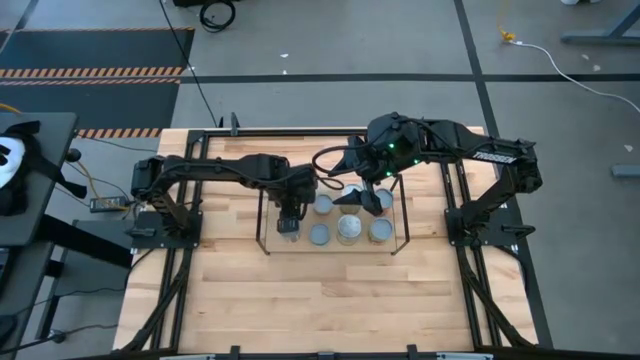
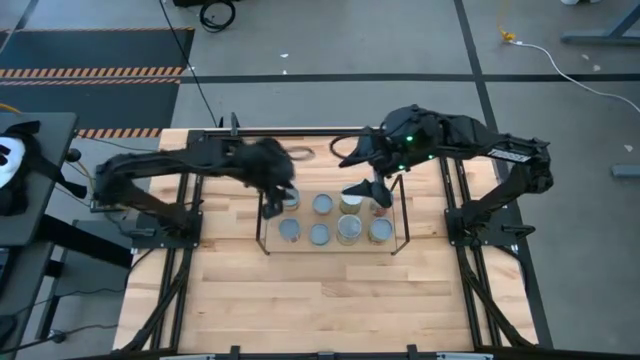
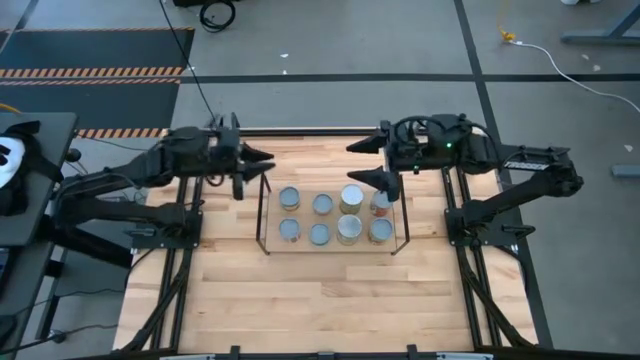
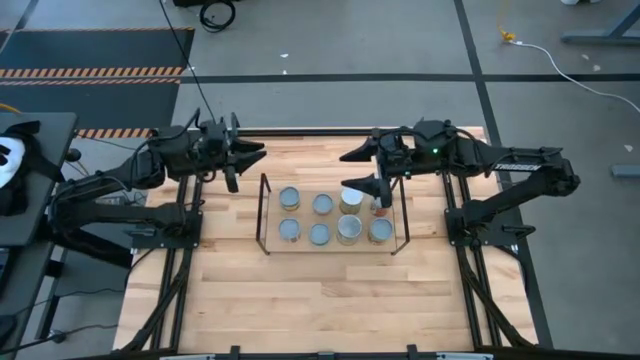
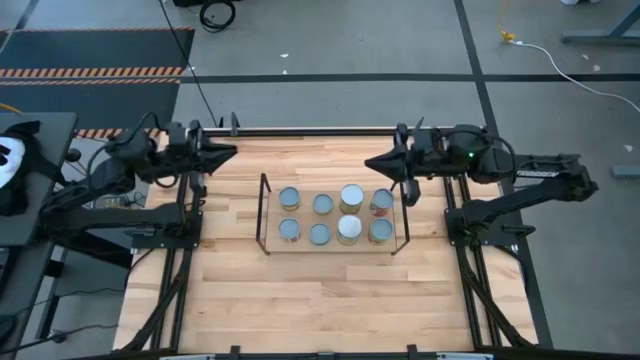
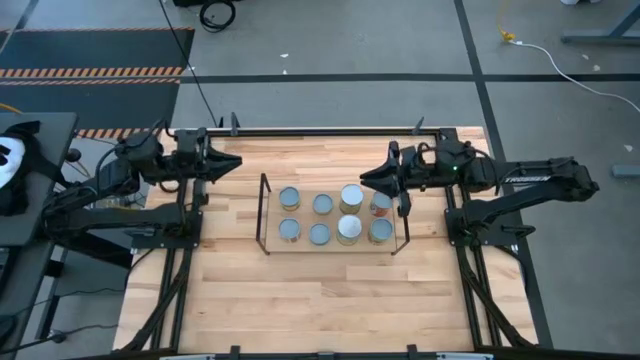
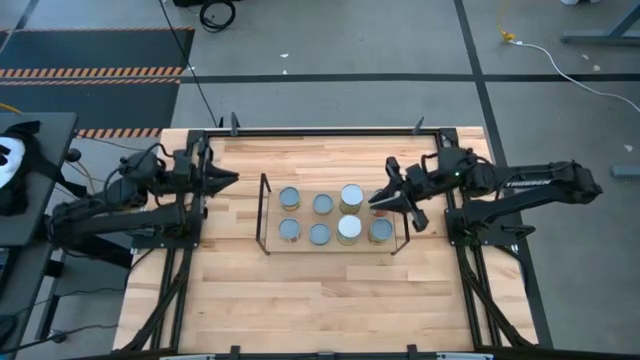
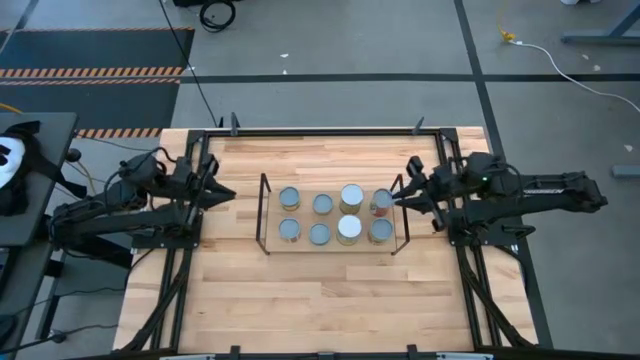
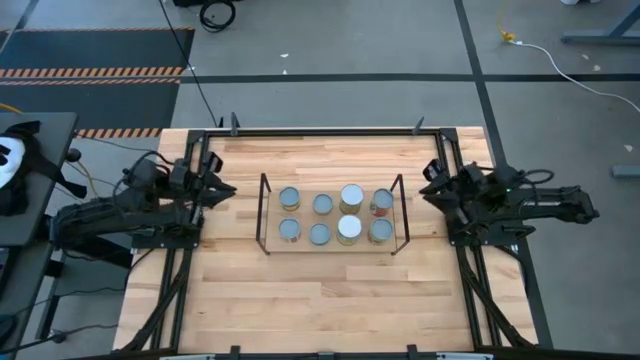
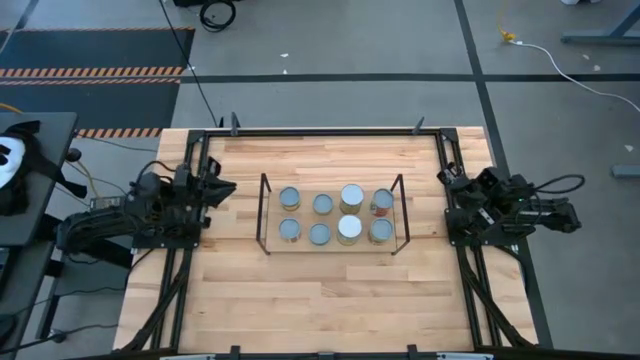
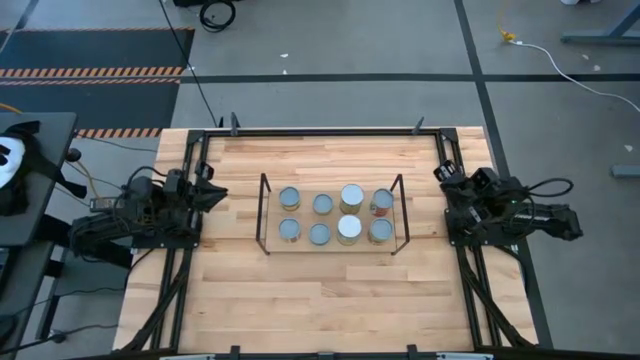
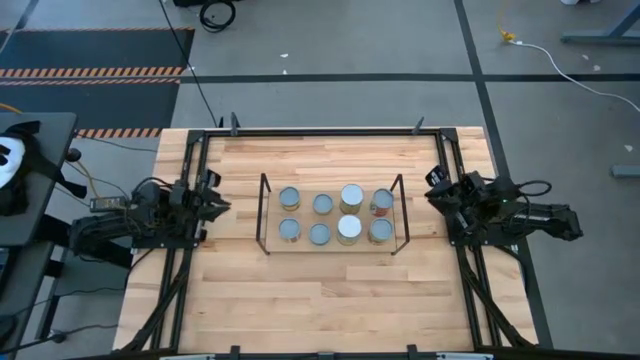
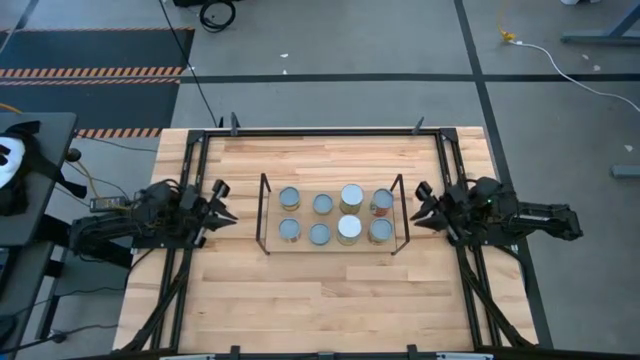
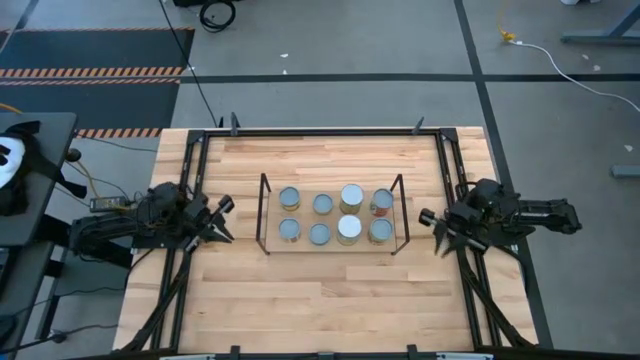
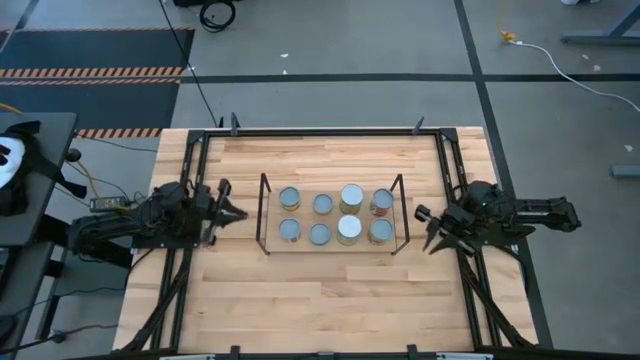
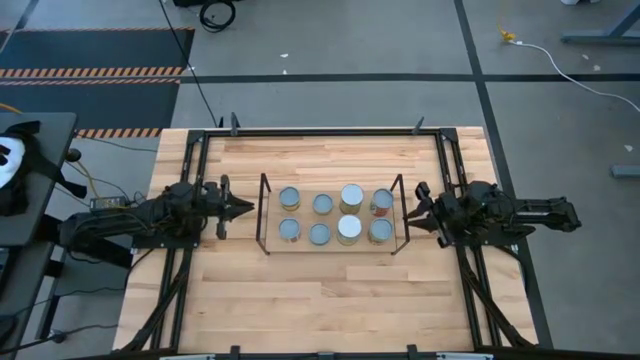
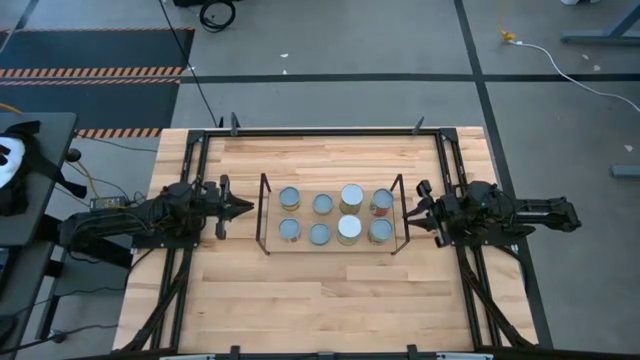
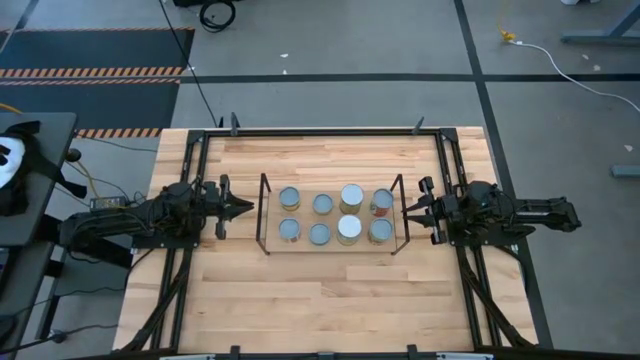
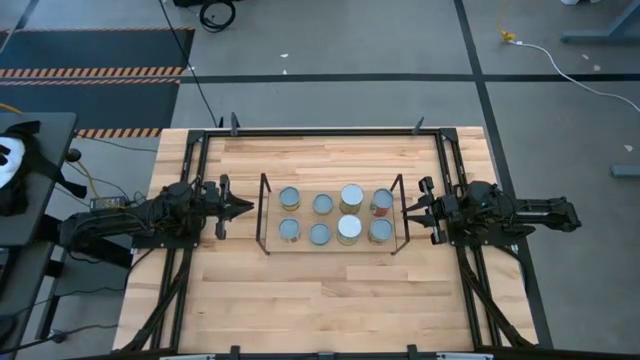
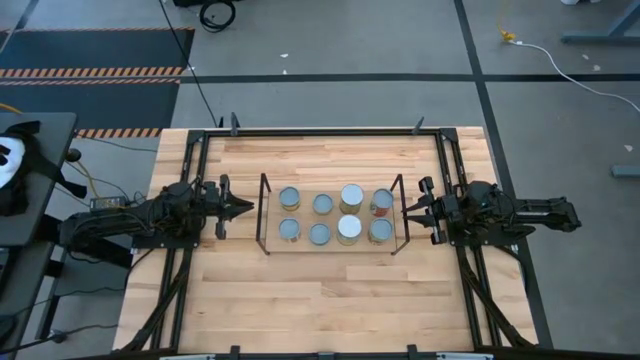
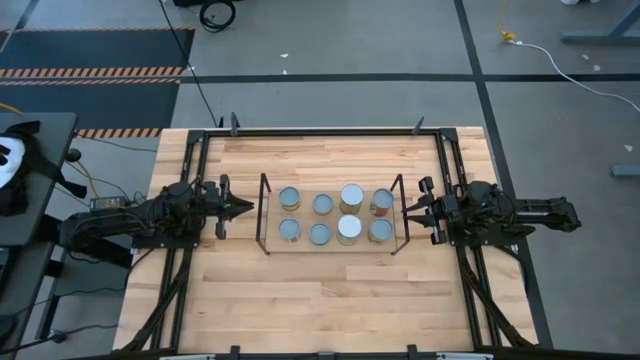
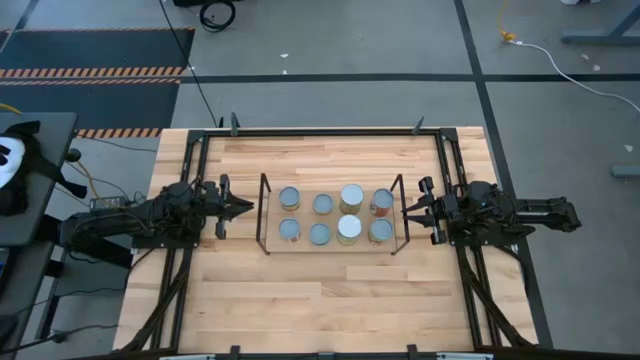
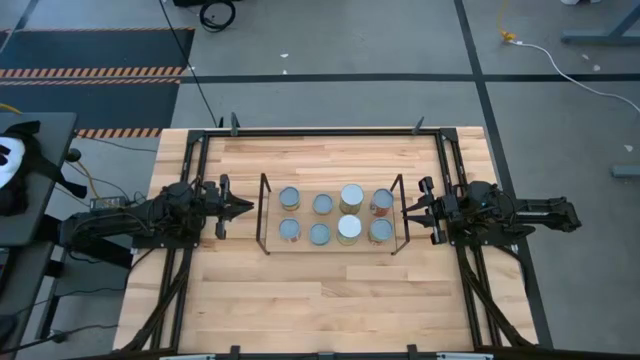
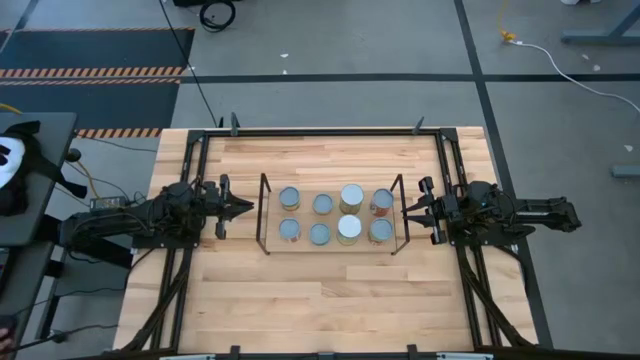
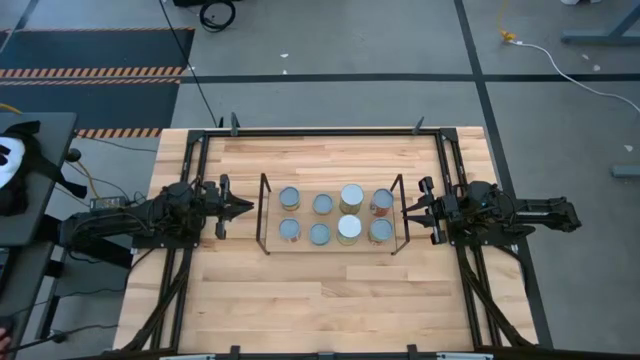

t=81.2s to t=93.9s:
Task: Pick and place cans onto a shelf
Return to Home Position

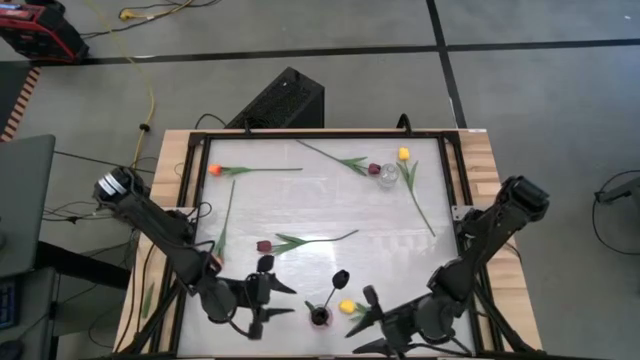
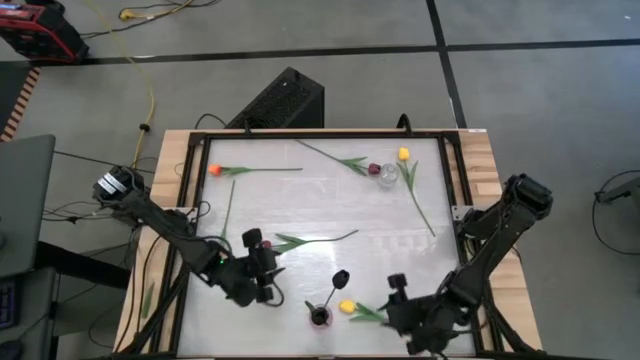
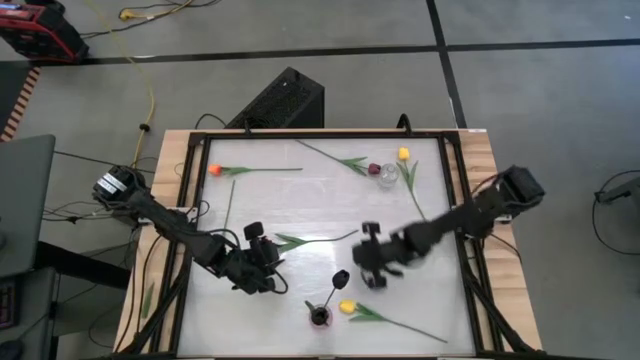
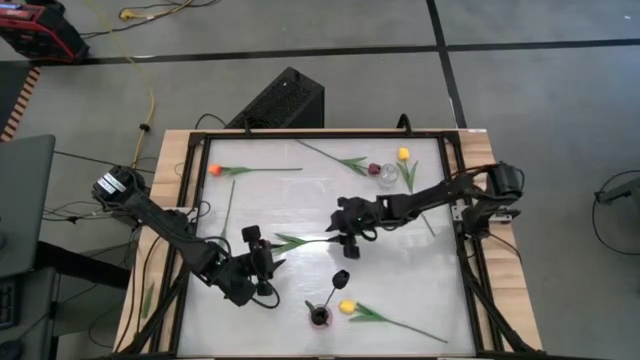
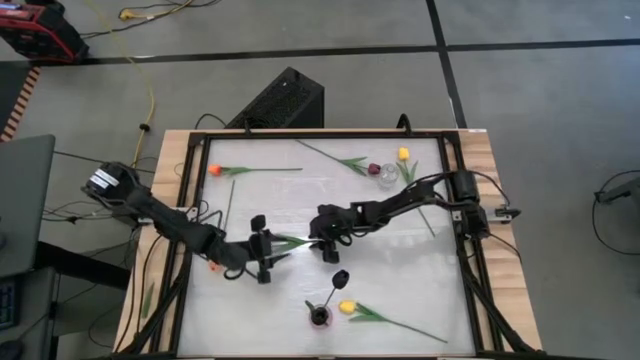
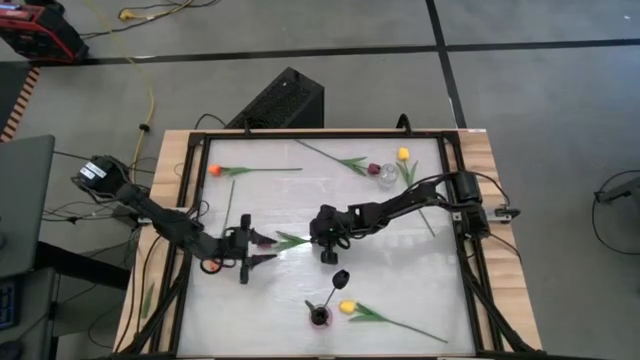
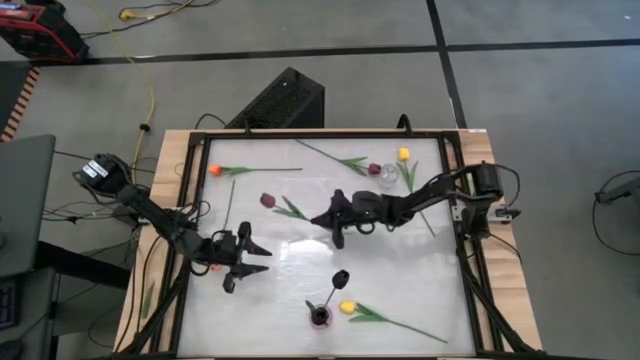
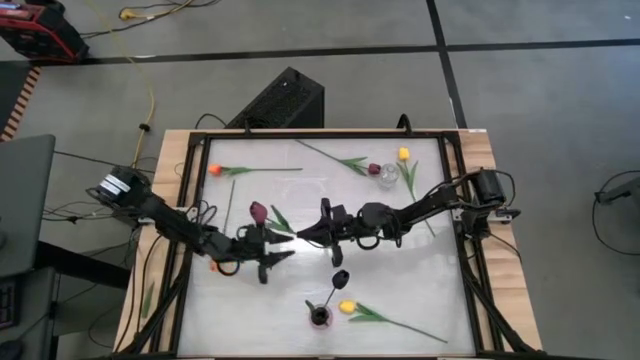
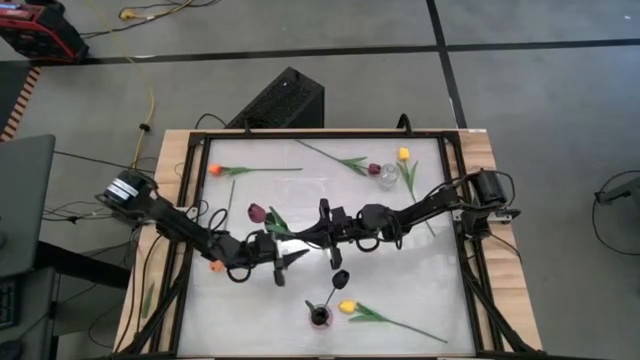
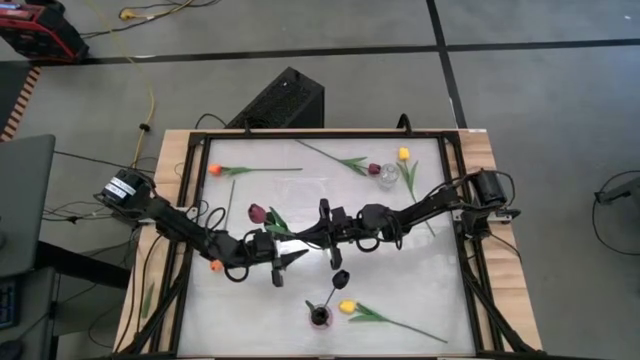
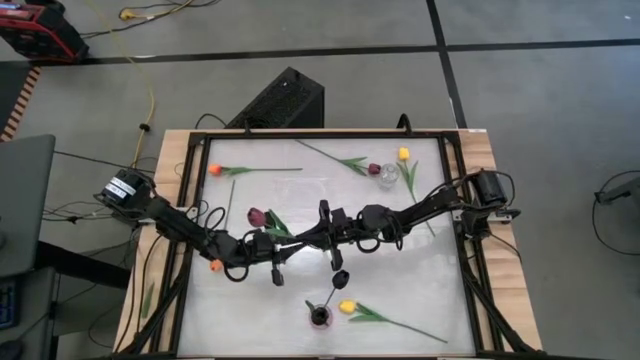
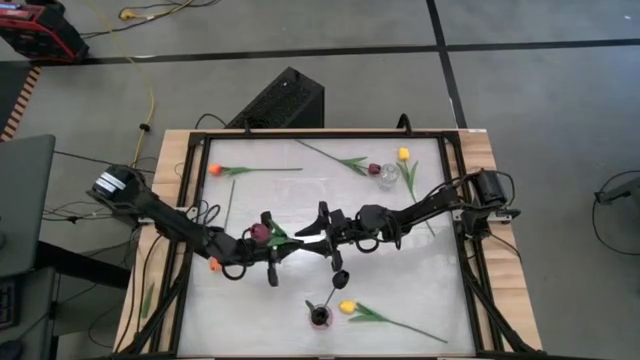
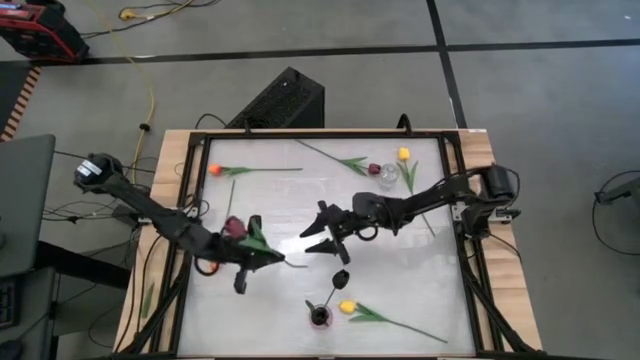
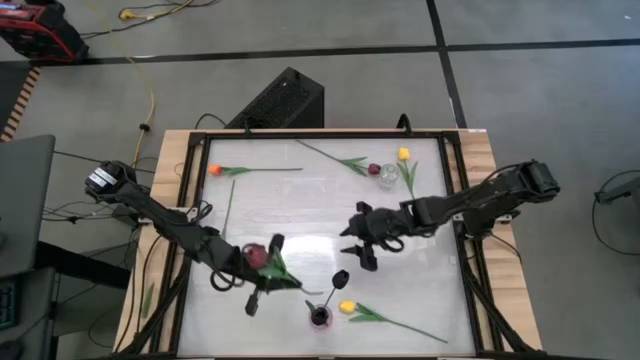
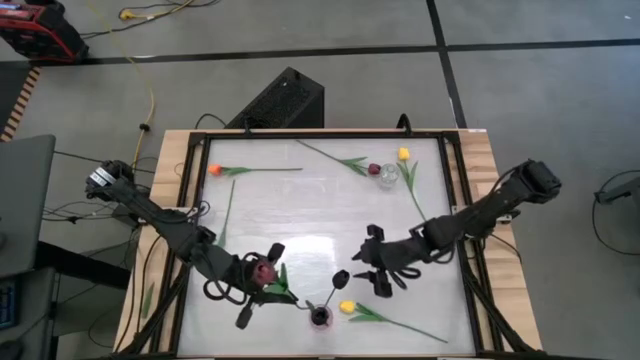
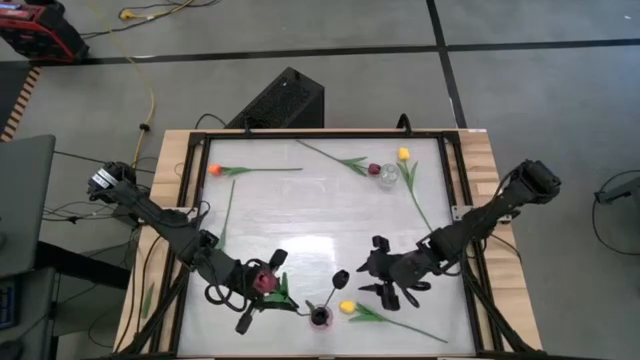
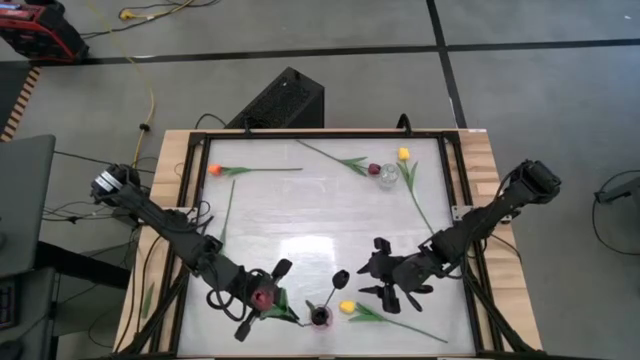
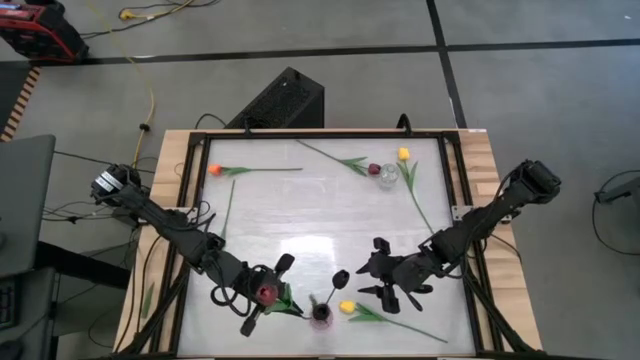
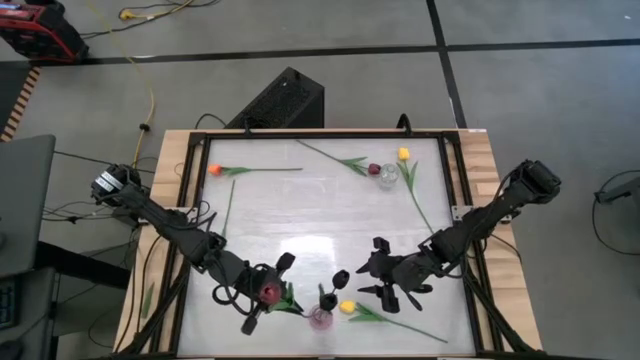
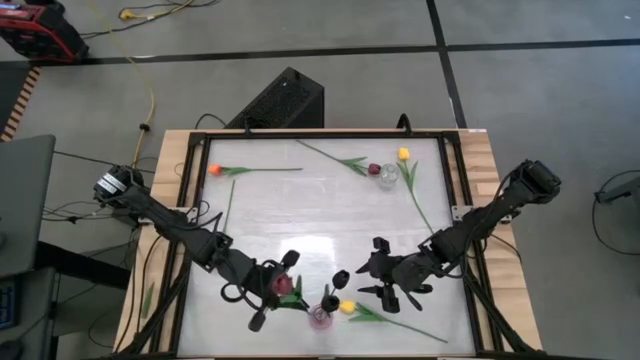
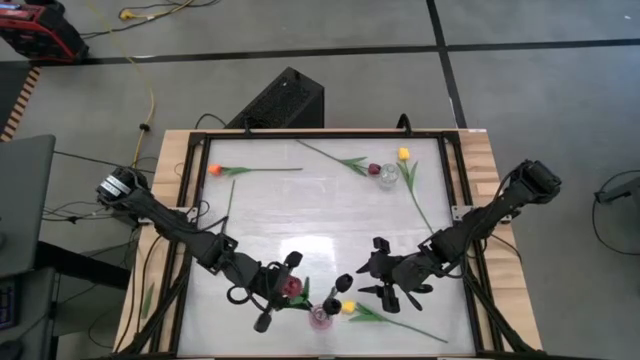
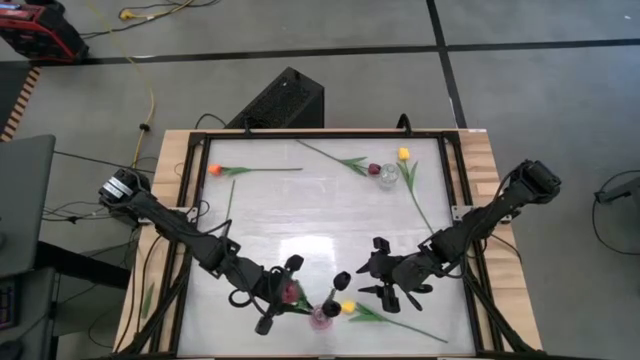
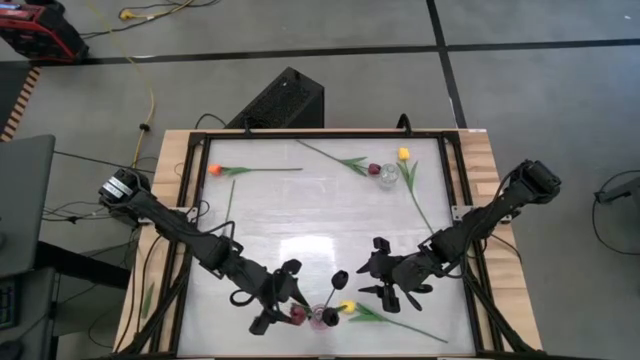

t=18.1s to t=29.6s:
Task: Sort flowers into vase by color
Put the bottom dark red tulip into the pink vase
